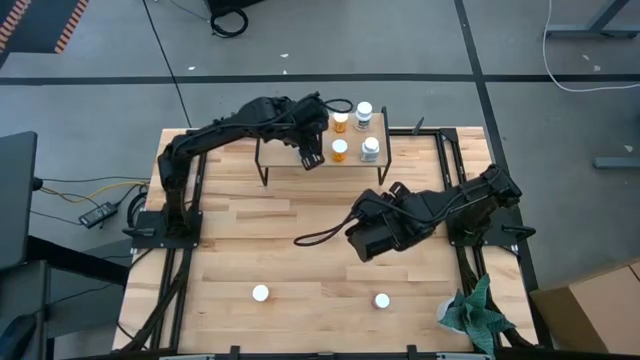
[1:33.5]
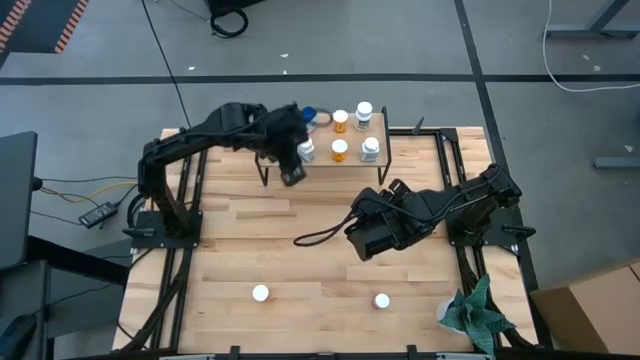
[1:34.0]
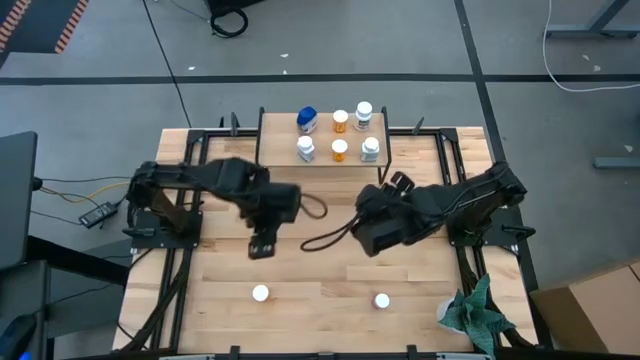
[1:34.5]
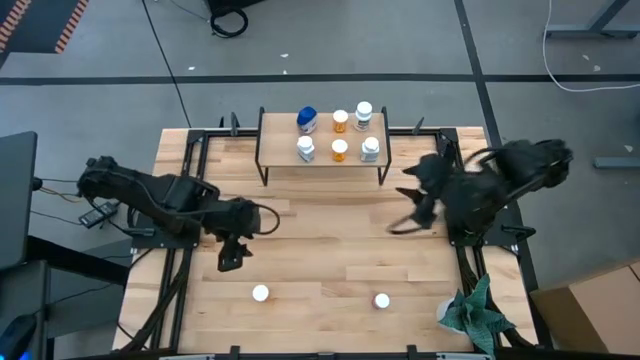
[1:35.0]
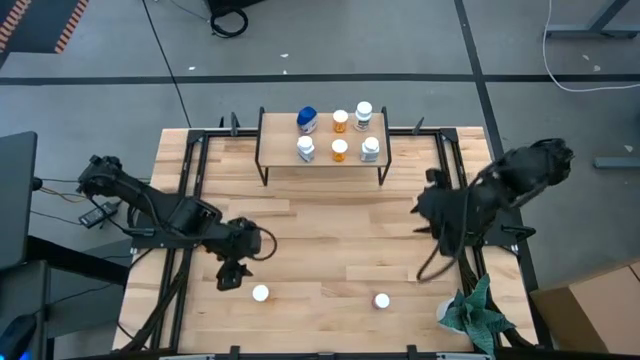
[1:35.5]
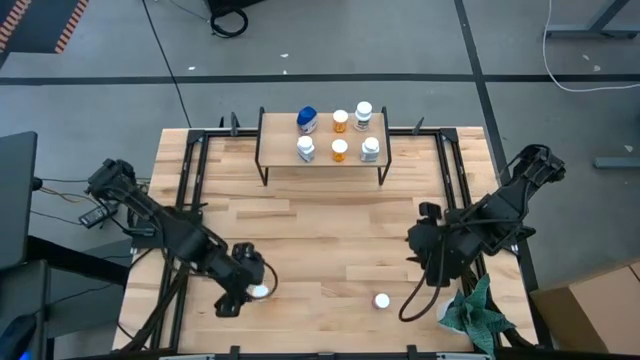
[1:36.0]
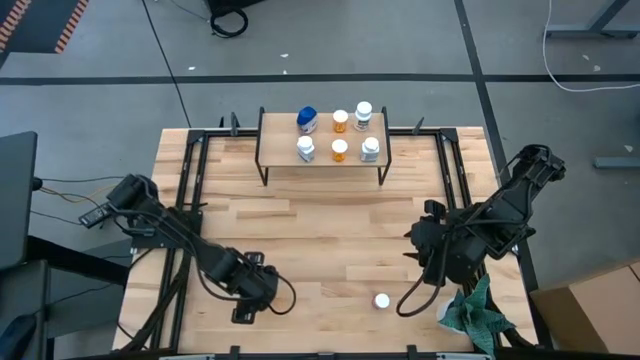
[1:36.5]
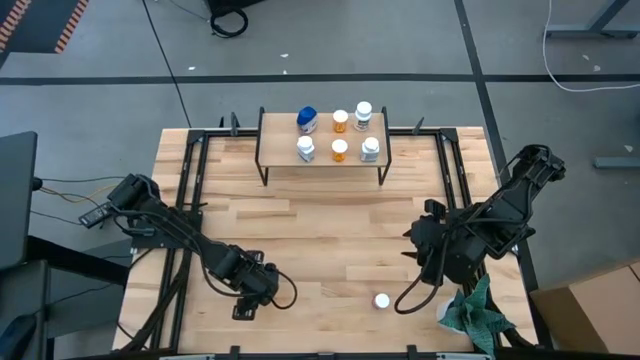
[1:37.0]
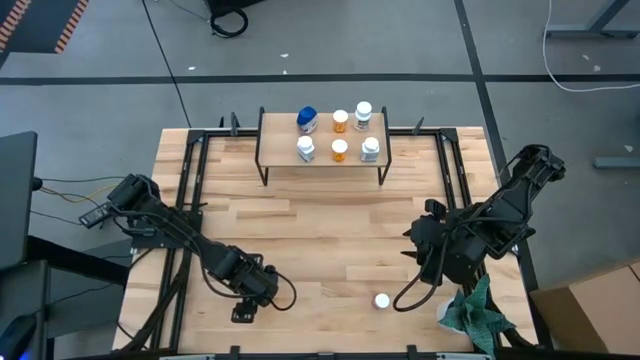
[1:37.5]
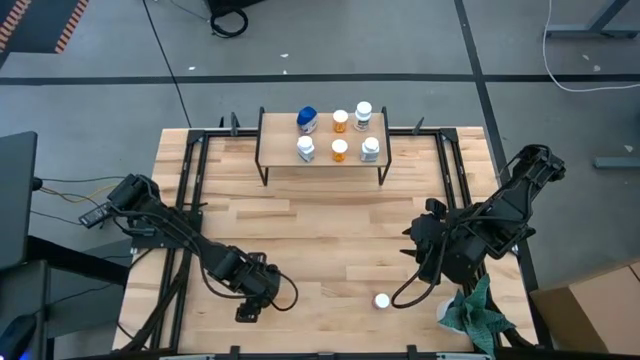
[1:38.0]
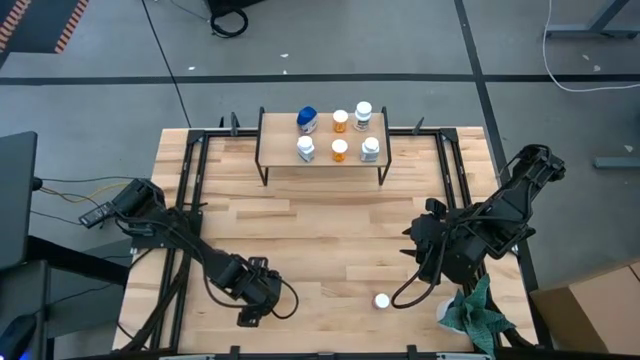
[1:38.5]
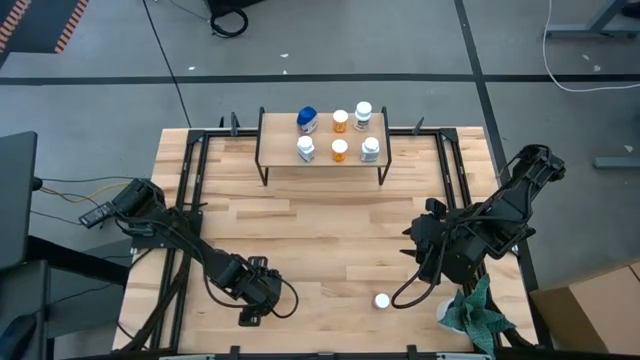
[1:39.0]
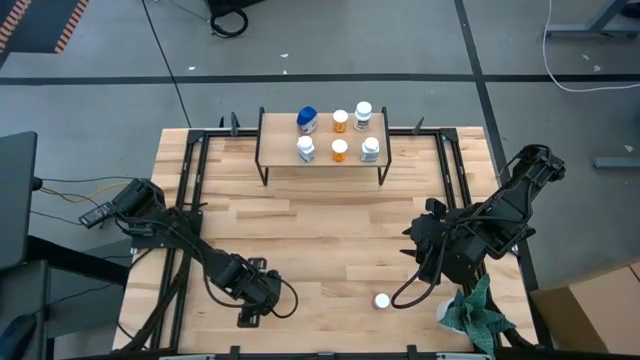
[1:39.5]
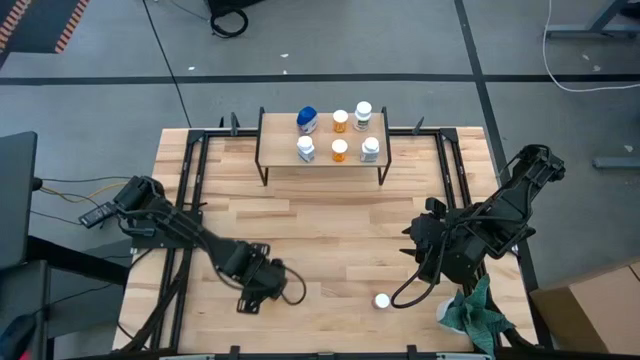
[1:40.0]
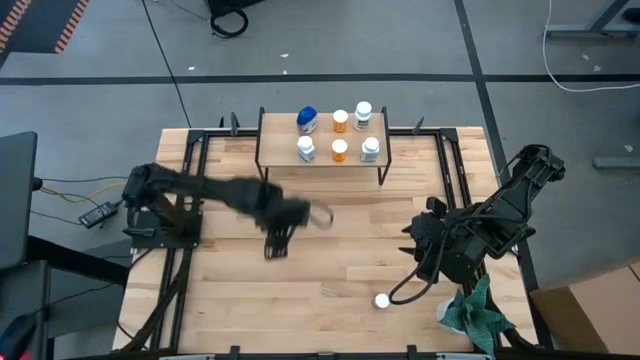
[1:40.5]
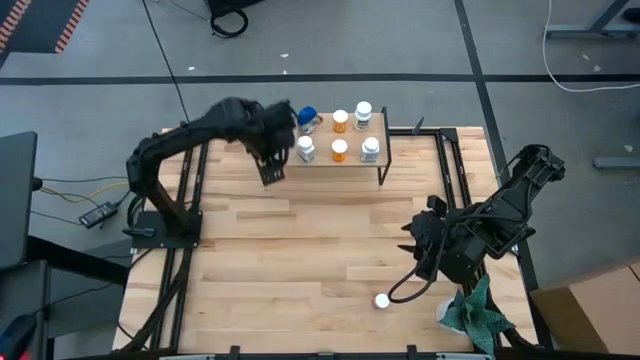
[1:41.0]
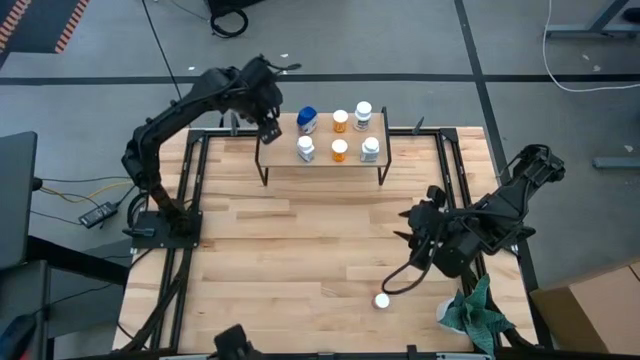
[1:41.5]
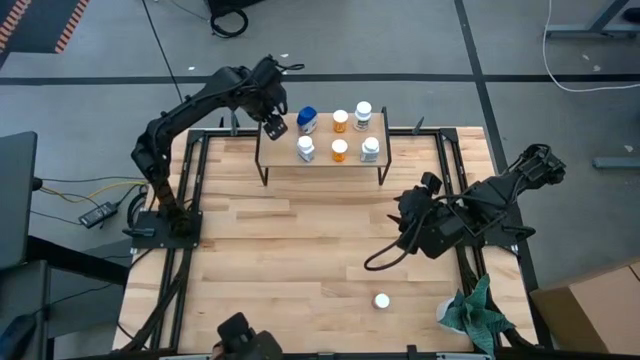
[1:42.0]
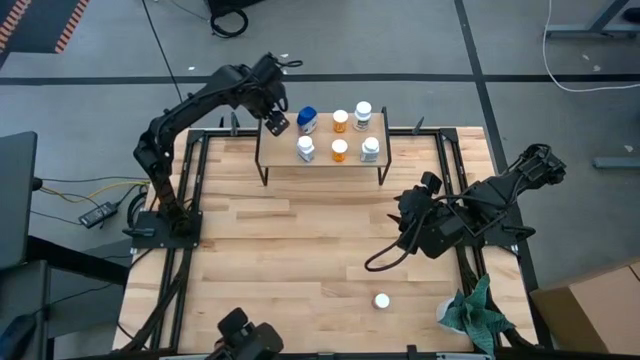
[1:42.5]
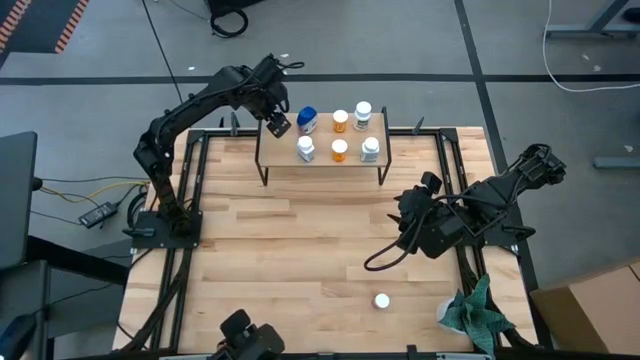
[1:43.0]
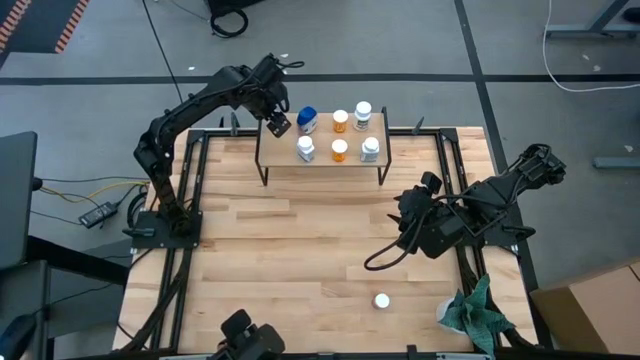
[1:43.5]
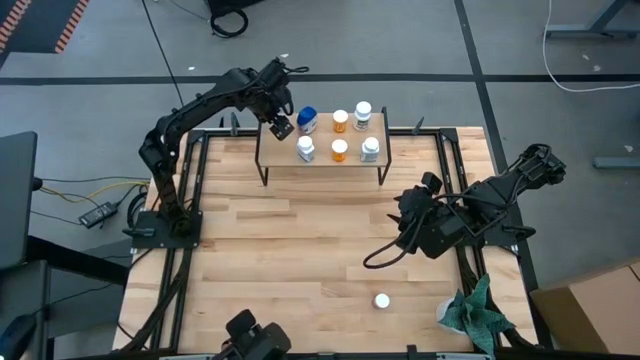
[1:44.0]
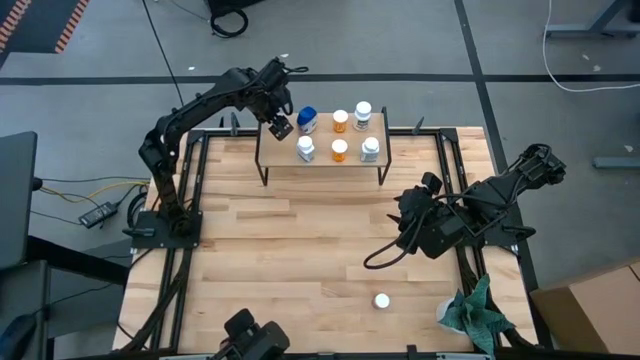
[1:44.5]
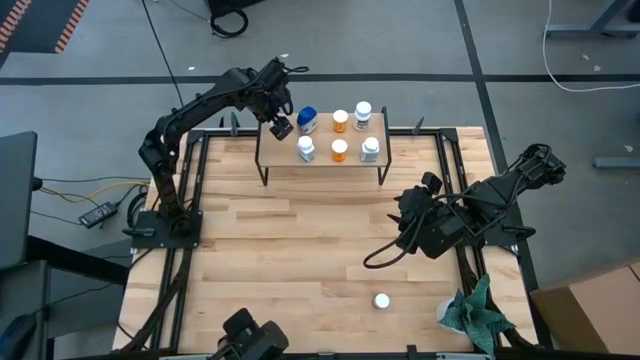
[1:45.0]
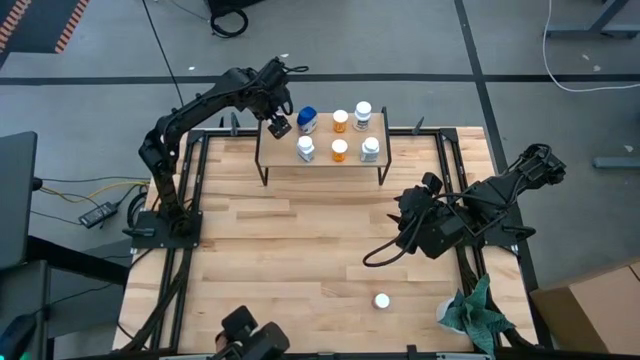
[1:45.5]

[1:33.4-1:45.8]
Task: Pick and place medicine bottles onto shelf by color
Put the orange medicine bottle onto the shelf

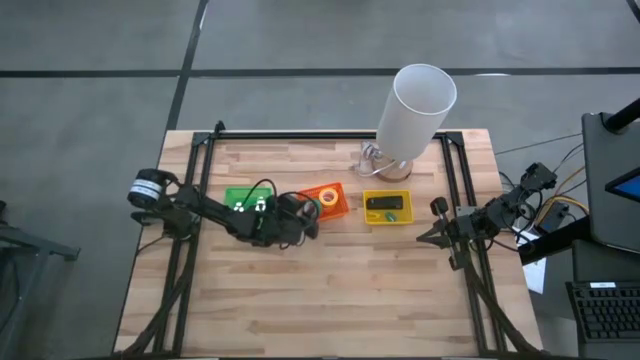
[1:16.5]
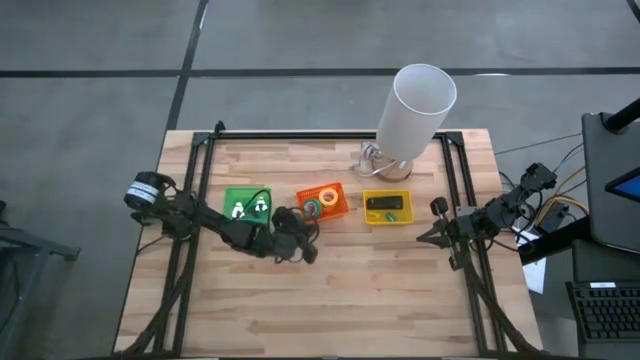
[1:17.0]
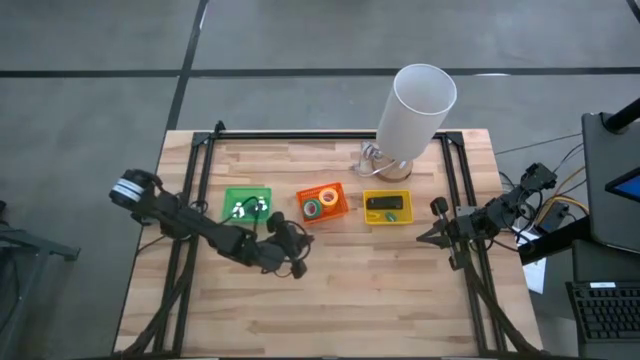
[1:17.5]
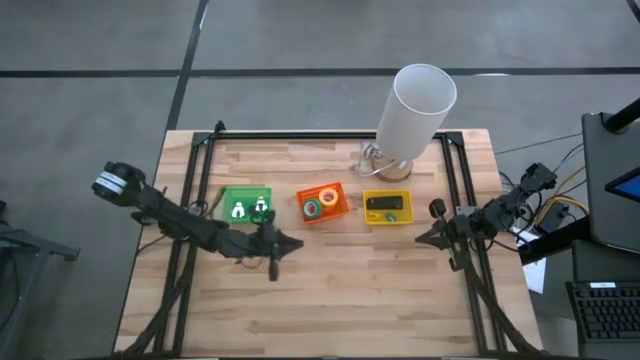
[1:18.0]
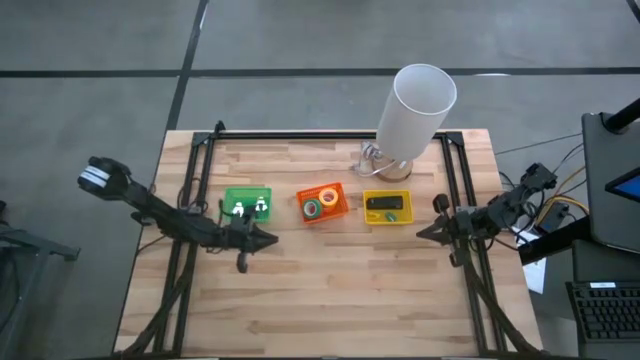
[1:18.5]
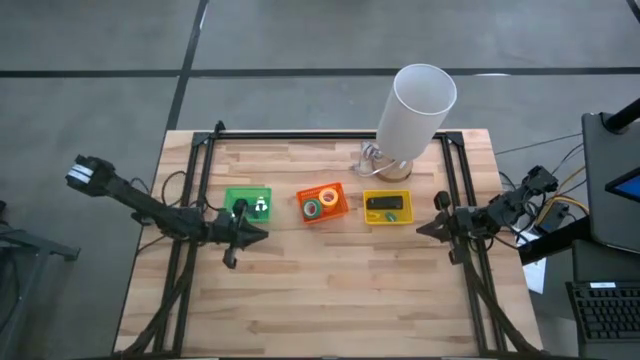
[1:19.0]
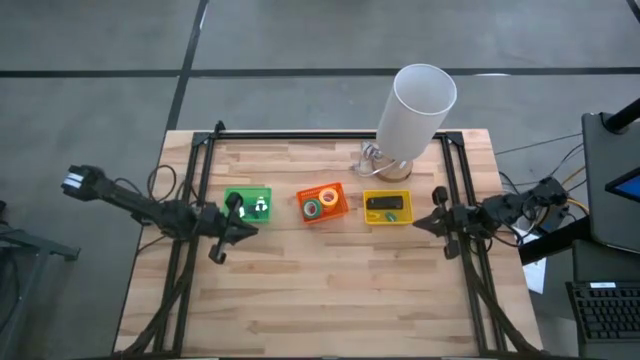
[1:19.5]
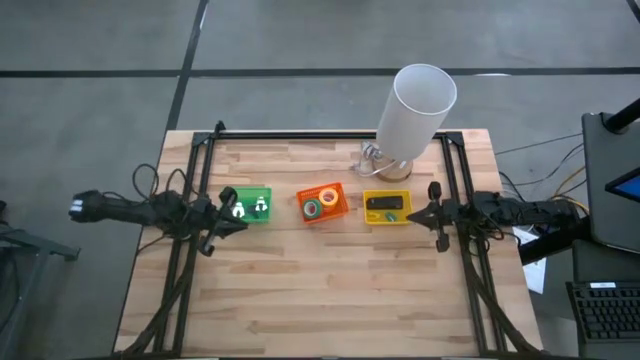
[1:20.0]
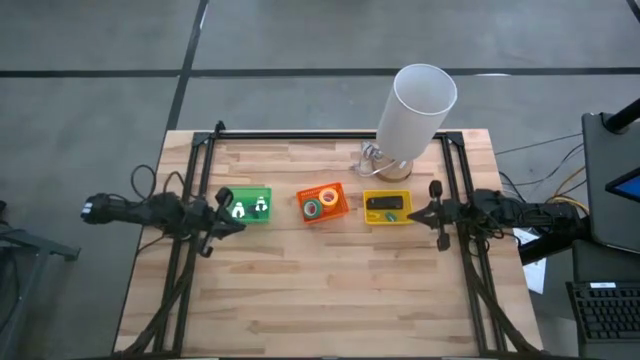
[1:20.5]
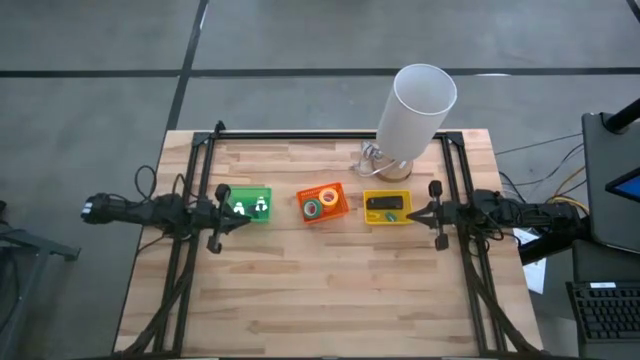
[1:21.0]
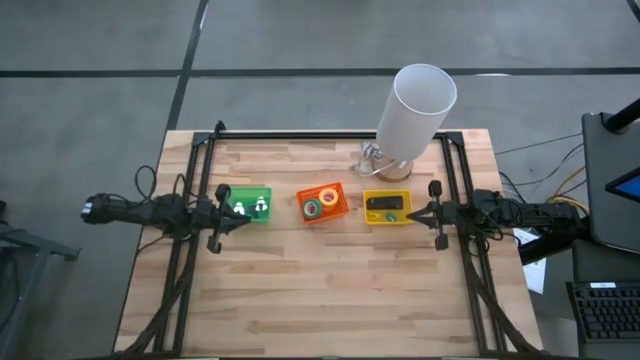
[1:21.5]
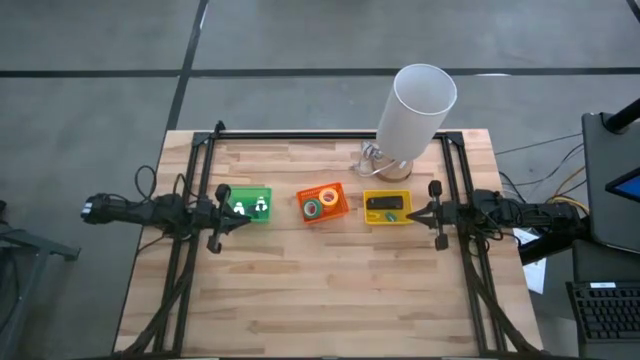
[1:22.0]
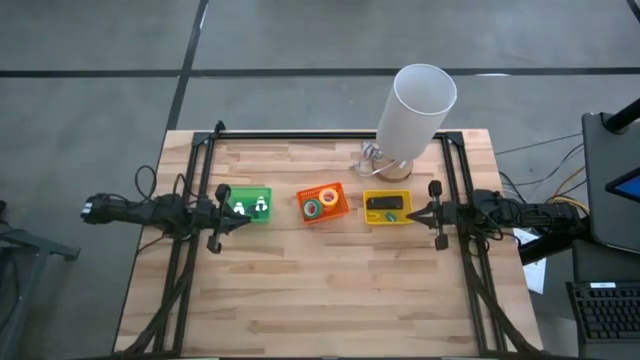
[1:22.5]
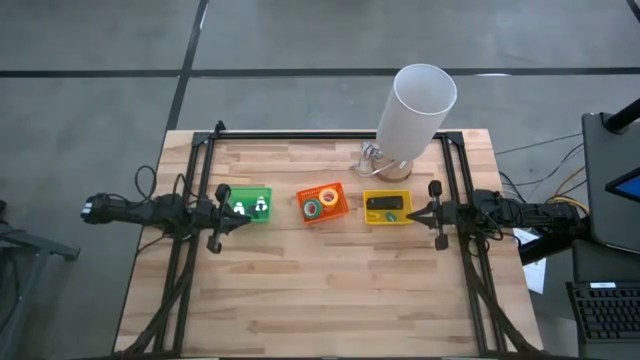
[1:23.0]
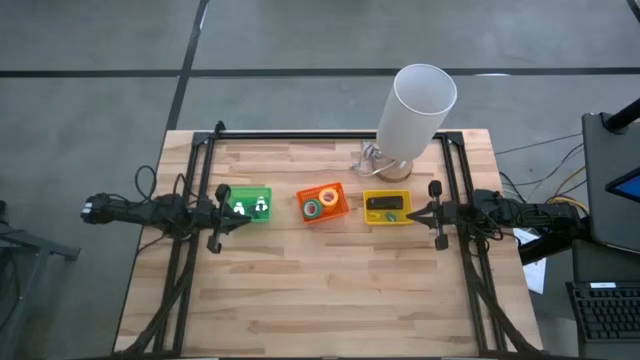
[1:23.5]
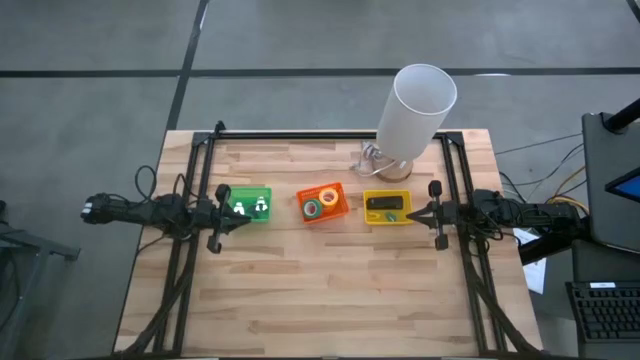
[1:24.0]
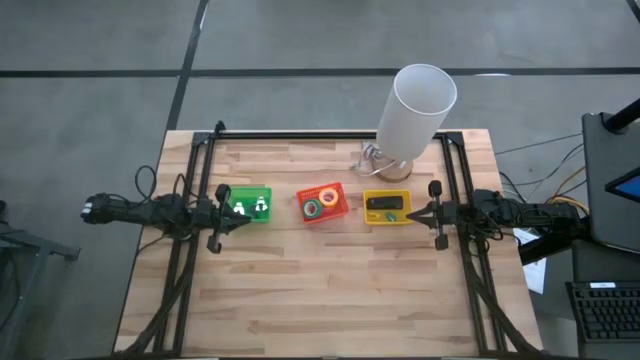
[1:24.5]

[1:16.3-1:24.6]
Task: Pick and place Stapler, Stapler remover, tape
Return to Home Position
